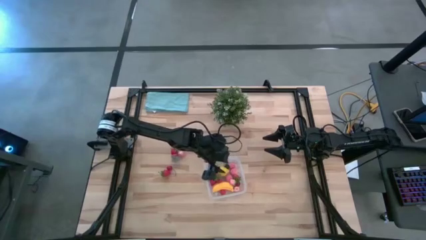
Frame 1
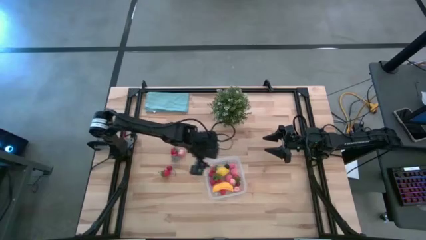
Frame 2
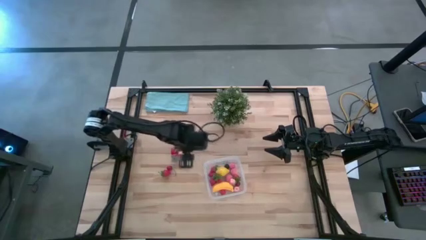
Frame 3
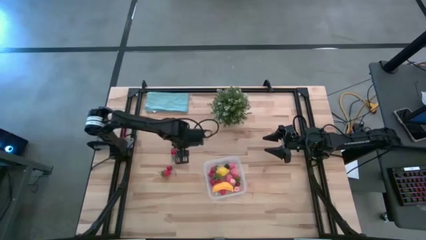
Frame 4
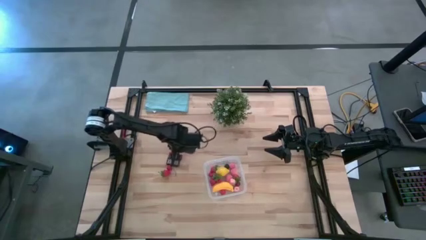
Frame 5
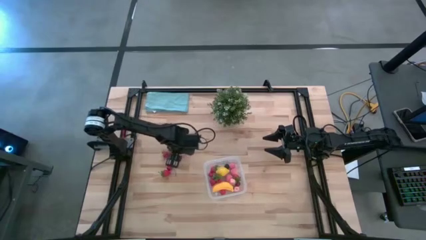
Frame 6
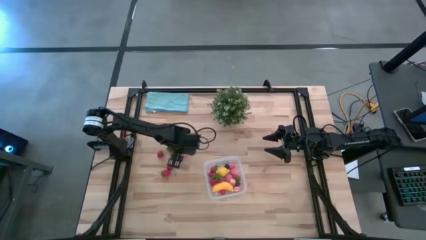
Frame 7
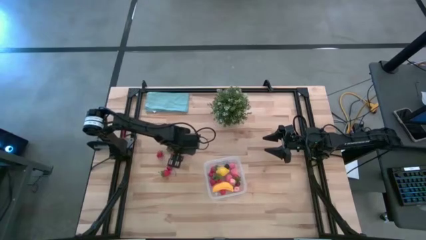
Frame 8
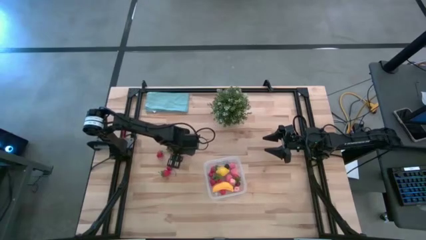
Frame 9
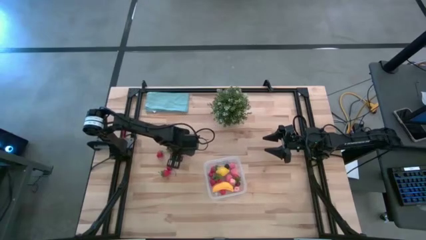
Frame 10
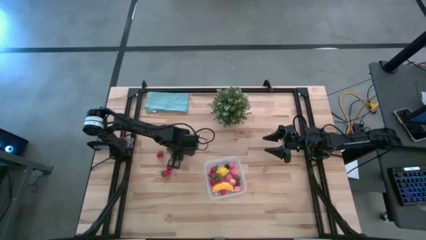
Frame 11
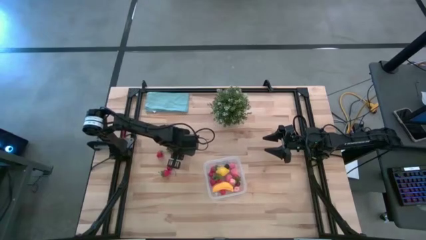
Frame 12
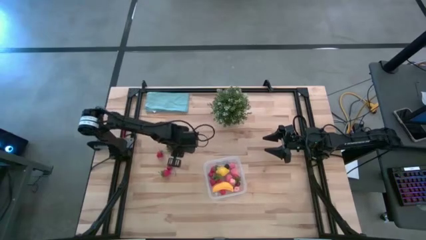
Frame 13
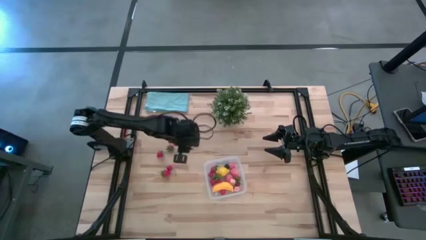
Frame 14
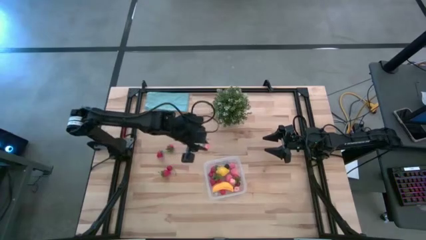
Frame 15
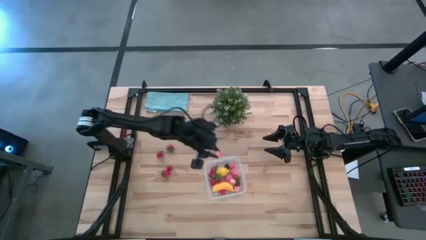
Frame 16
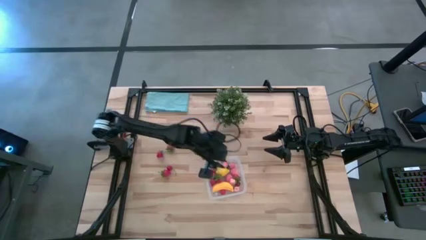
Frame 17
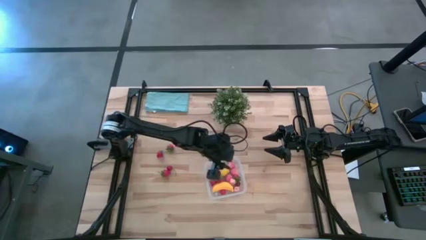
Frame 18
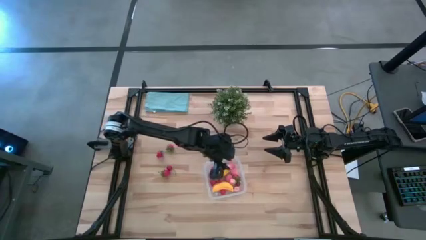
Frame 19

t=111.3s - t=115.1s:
Task: Pick and placing Produce into tupperware
Put the pink peach into the transparent bin

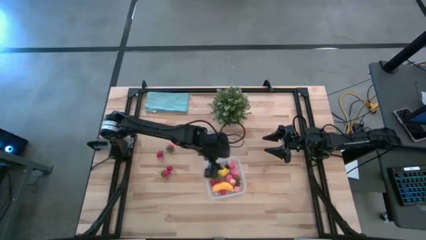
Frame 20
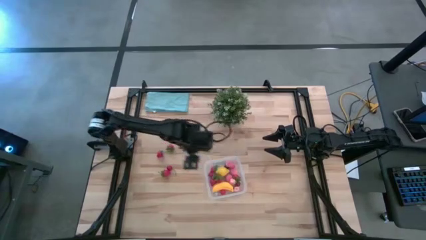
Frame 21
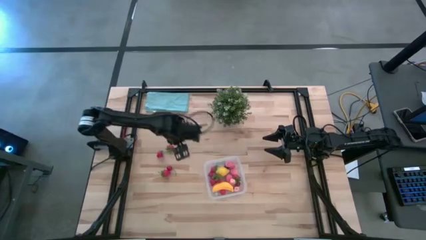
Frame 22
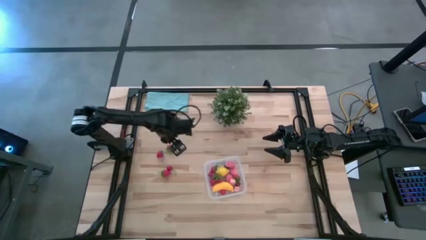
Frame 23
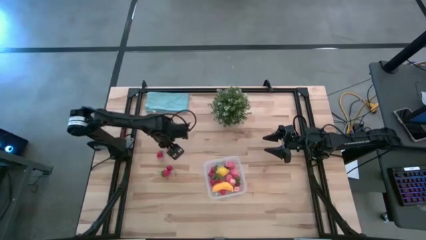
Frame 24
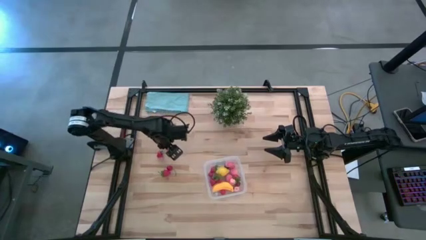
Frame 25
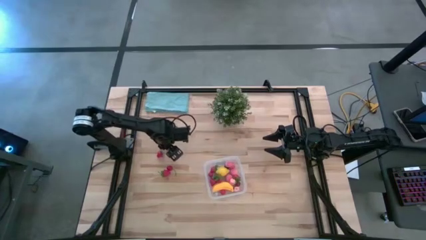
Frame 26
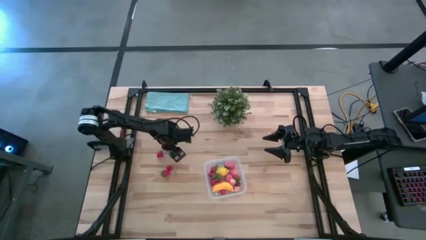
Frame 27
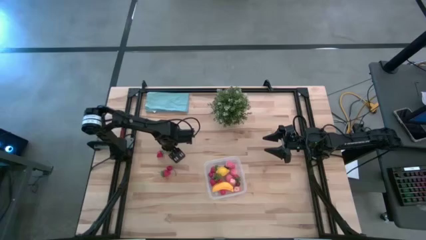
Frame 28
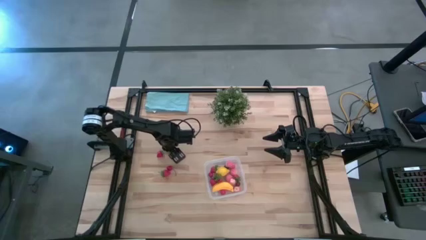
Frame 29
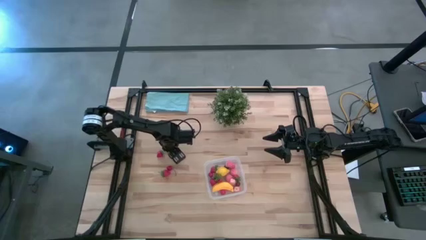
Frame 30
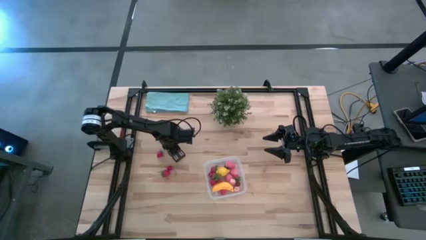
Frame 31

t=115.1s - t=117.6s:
Put the red strawberry into the transparent bin

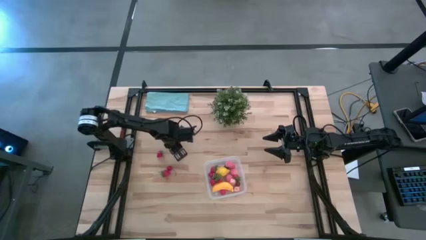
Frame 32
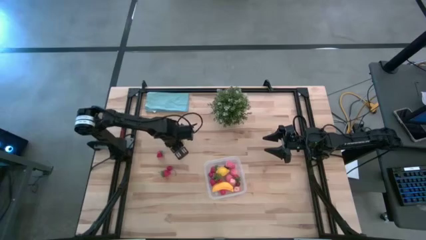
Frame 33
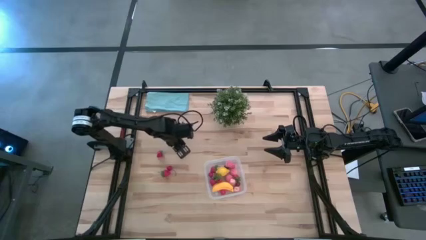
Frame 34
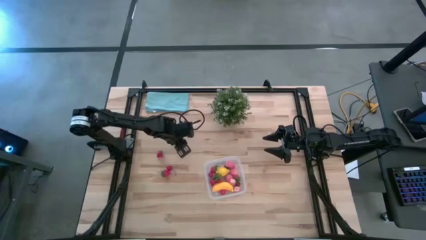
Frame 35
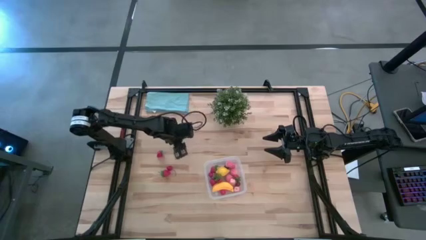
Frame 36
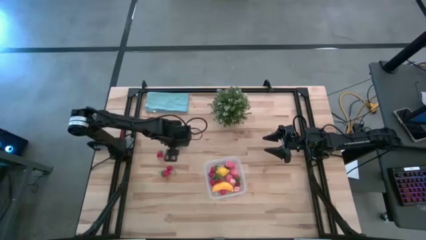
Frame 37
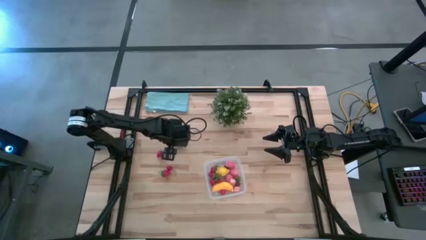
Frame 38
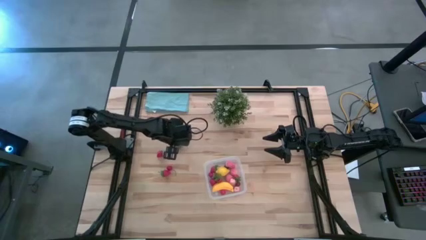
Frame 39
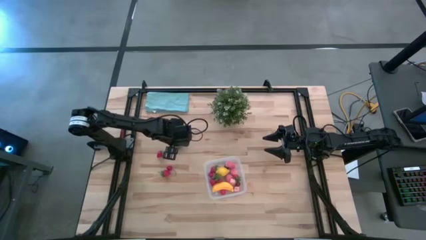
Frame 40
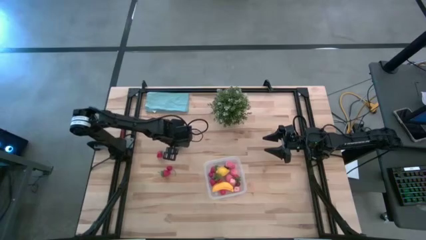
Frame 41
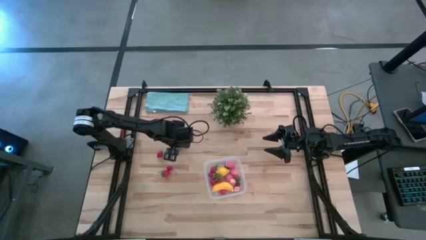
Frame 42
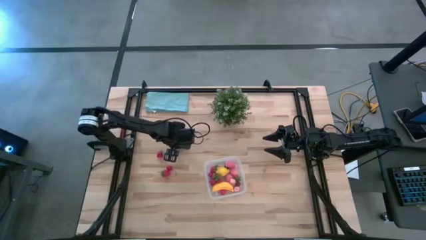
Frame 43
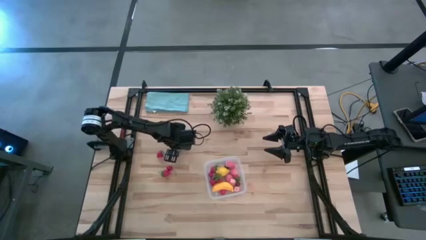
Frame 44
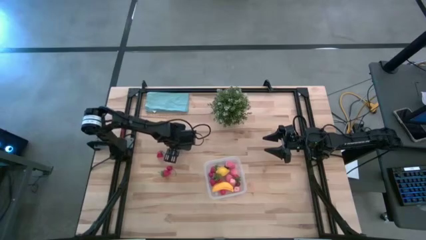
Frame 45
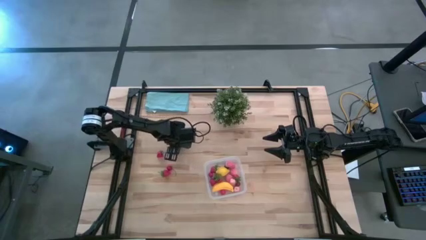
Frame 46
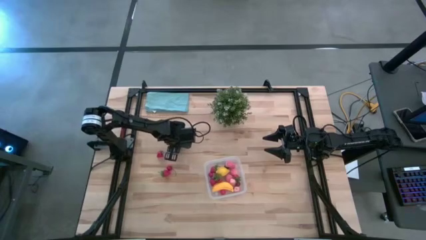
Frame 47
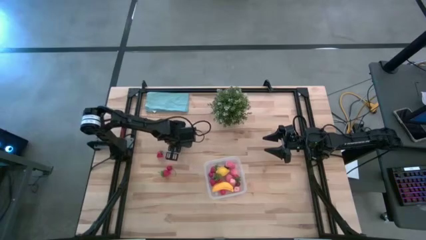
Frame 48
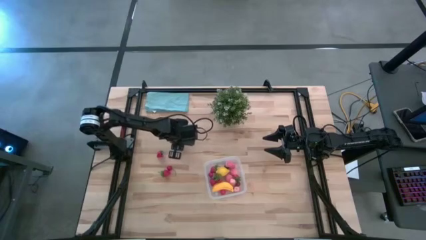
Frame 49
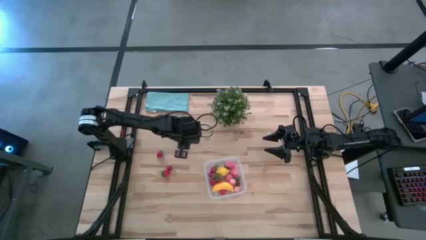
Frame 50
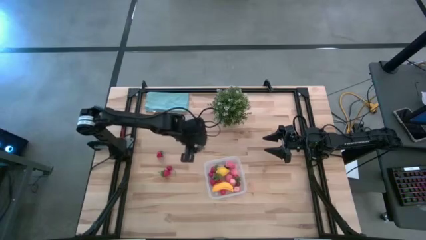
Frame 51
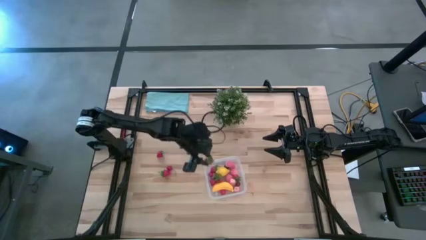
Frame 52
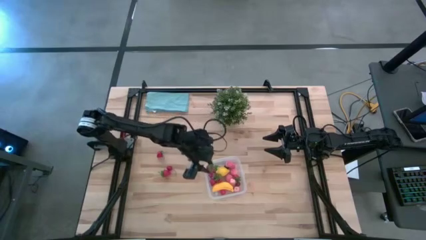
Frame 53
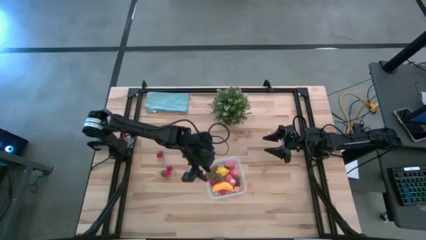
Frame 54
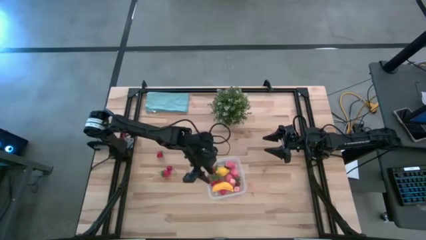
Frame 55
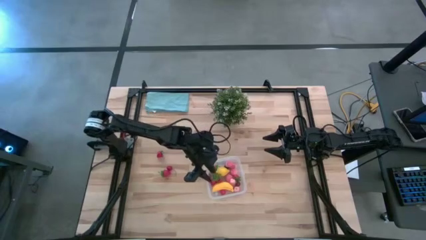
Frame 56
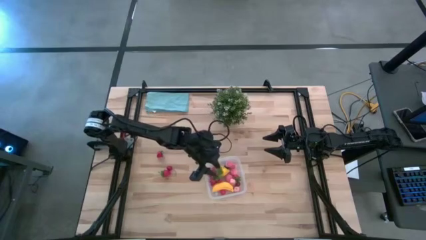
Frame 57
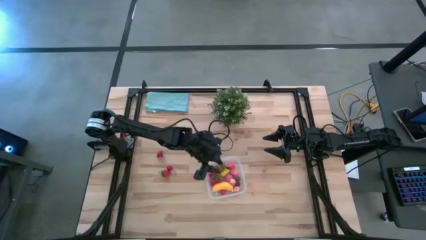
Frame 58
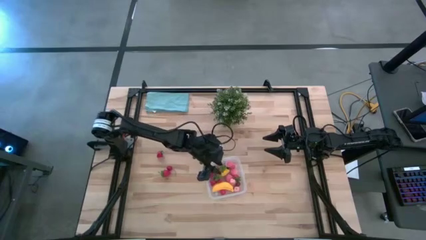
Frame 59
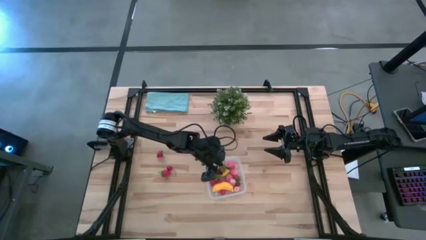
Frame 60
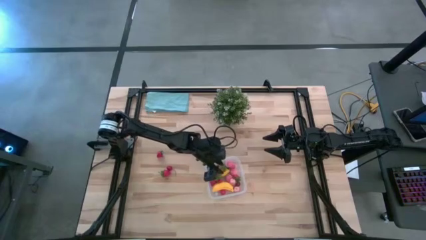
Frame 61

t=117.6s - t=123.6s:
Put the red strawberry into the transparent bin

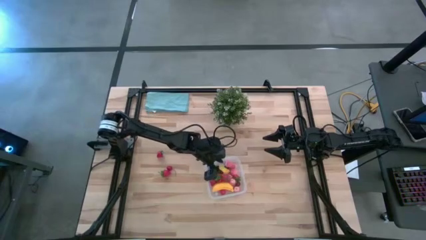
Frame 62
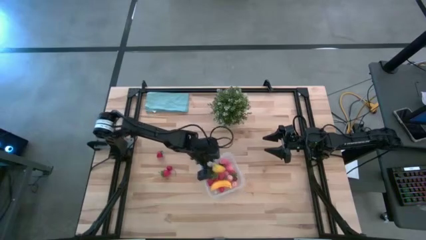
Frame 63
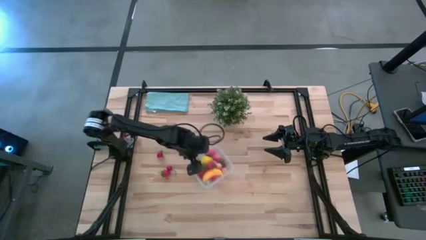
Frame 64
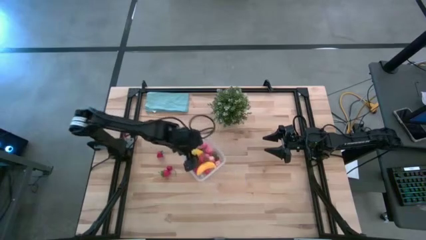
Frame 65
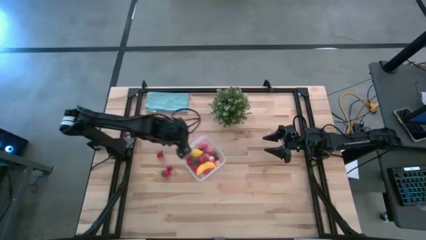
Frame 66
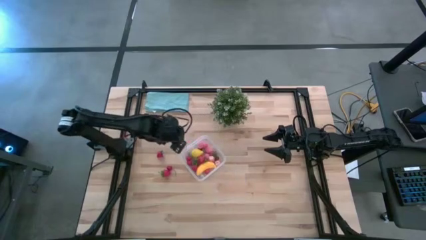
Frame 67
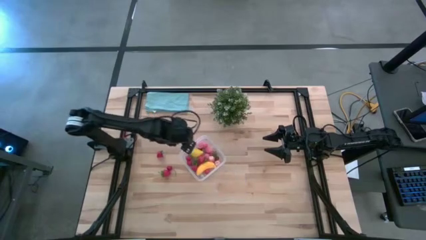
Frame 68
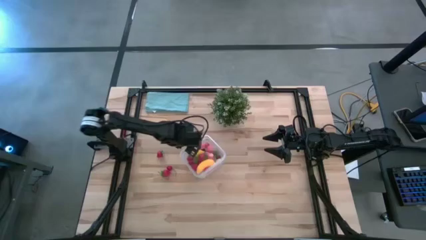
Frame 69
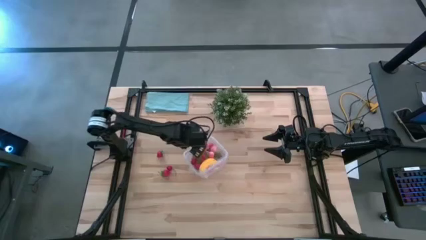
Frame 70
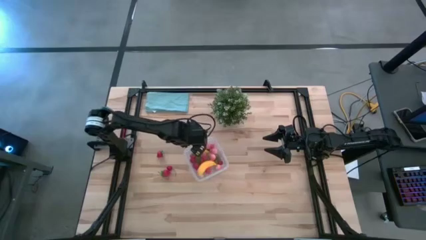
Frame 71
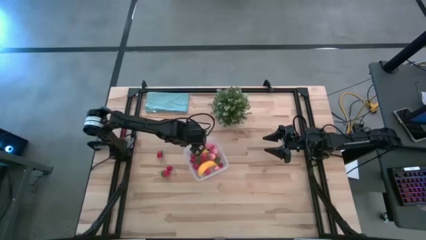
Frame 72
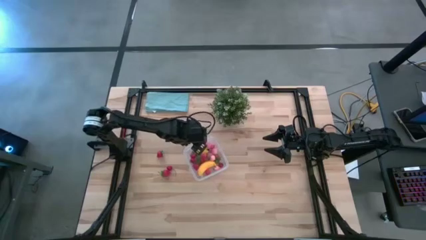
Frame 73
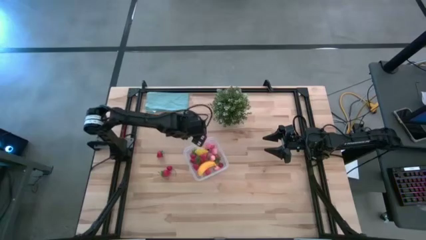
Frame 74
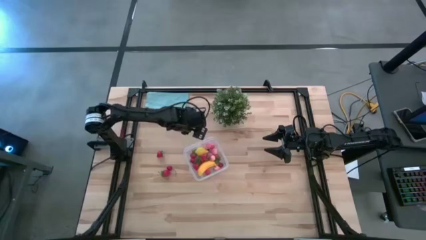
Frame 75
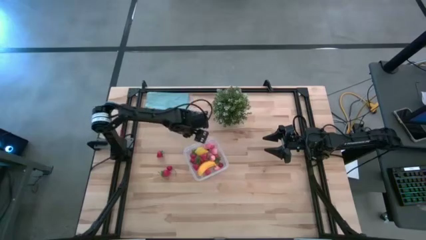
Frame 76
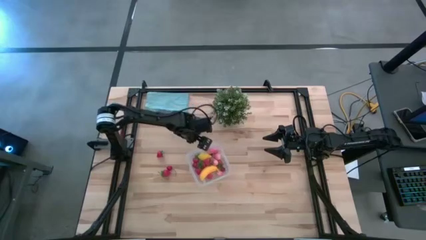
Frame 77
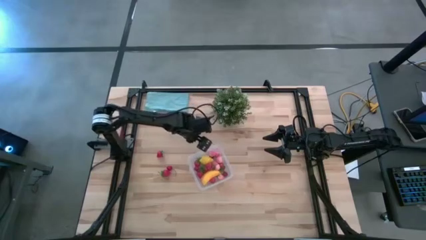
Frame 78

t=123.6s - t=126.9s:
Adjust the transparent bin on the table

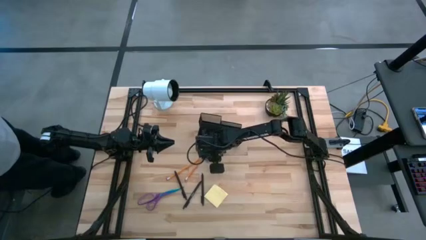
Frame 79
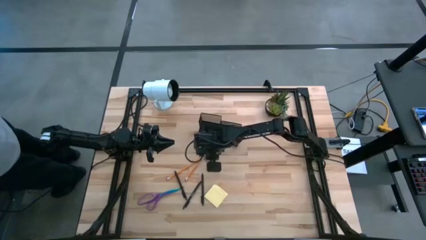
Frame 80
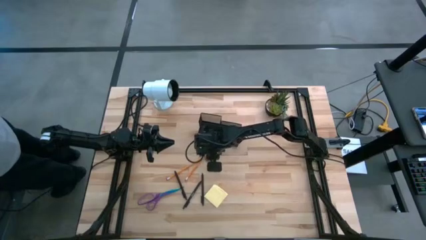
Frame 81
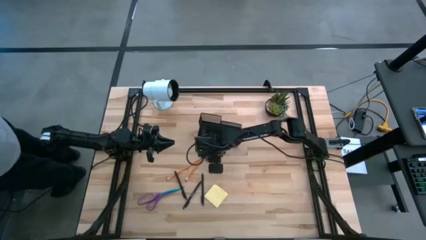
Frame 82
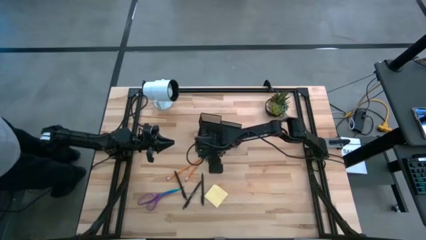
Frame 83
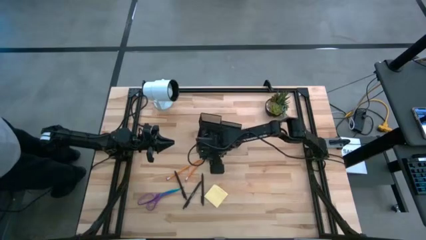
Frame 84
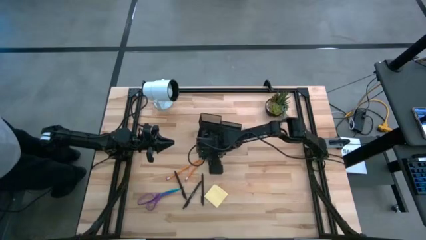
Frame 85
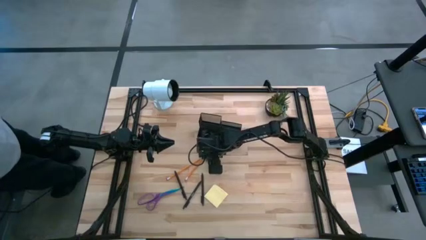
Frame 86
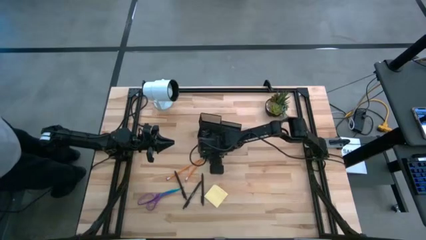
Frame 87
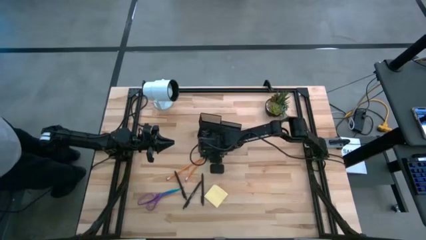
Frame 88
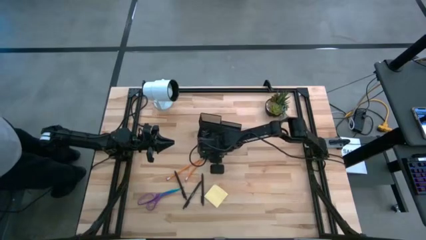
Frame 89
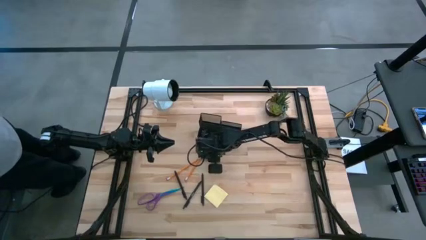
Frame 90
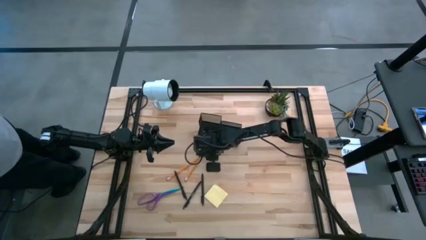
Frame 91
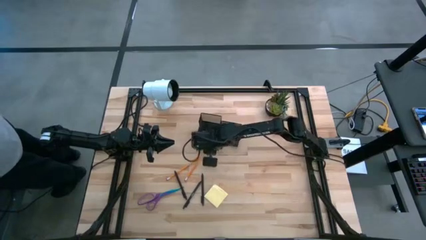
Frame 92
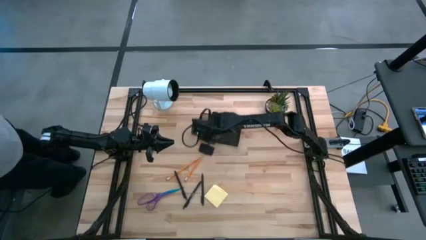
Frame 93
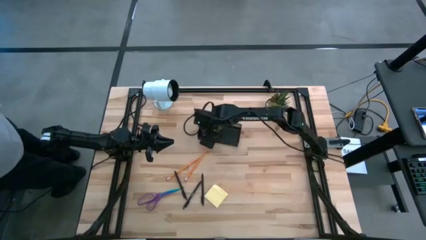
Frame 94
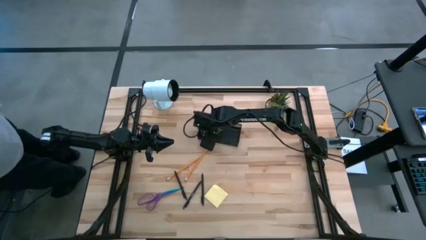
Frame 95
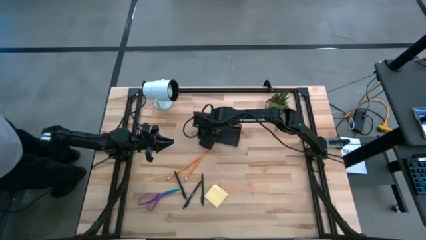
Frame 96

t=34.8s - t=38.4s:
Task: Pick and place office supplies into organizer
Put the blue eraser into the black desk organizer
